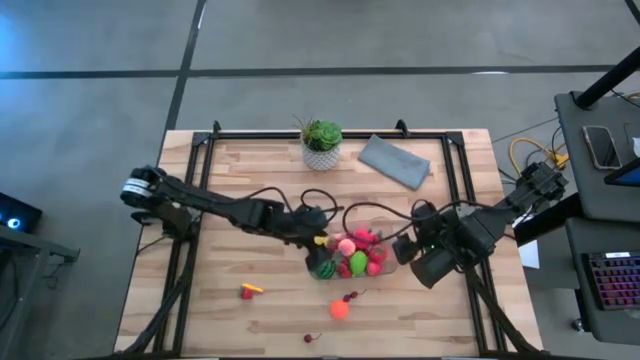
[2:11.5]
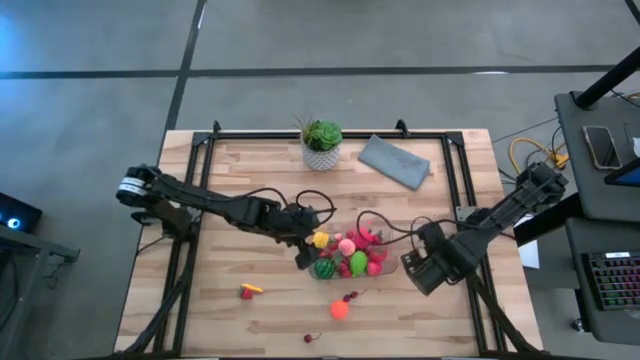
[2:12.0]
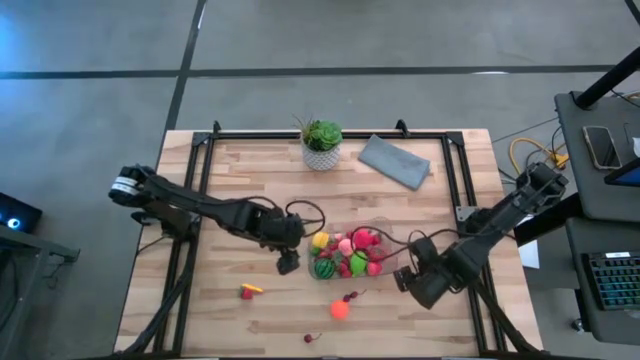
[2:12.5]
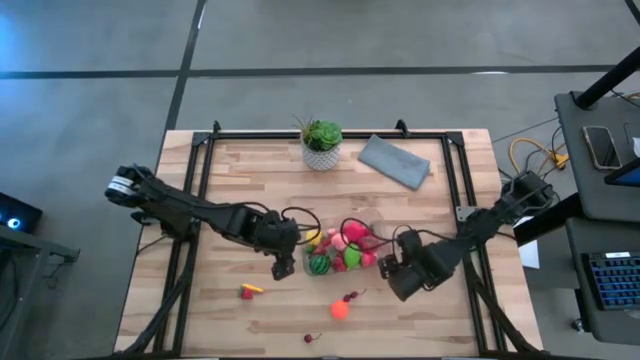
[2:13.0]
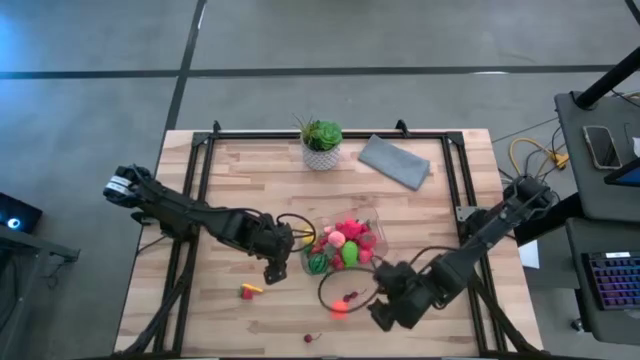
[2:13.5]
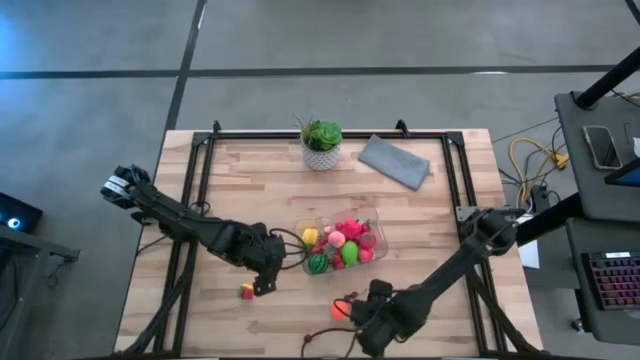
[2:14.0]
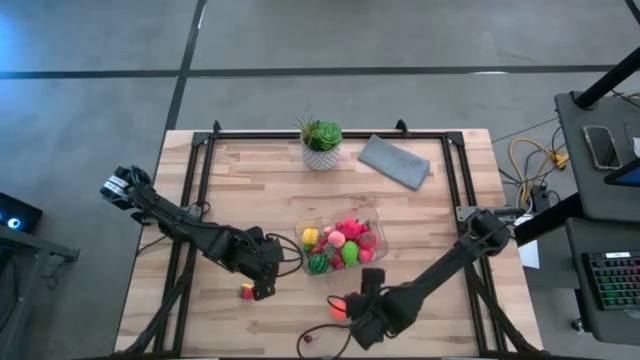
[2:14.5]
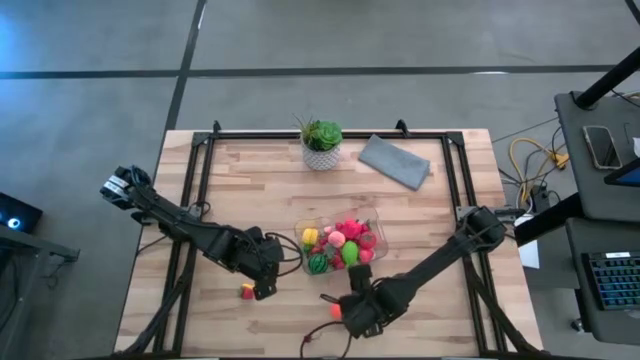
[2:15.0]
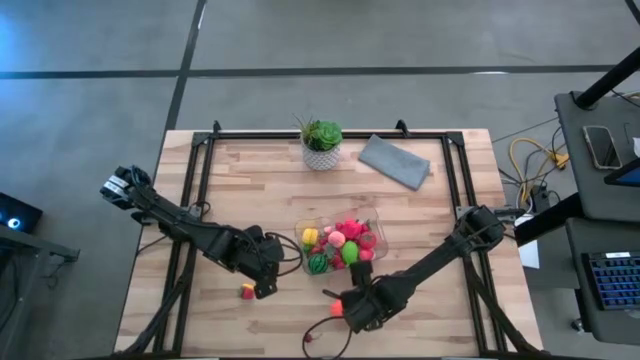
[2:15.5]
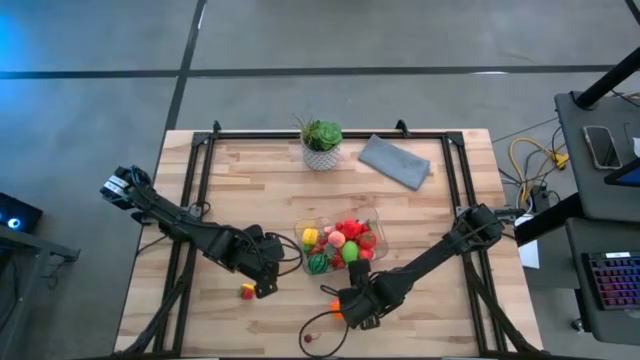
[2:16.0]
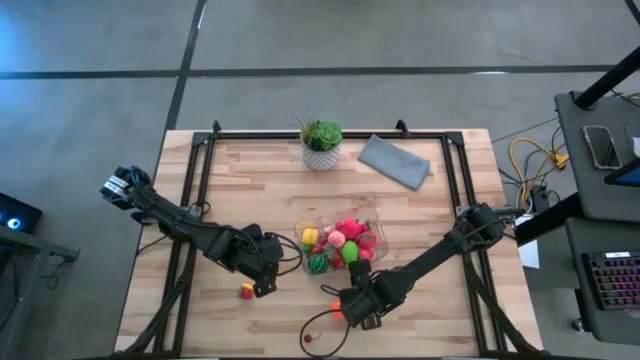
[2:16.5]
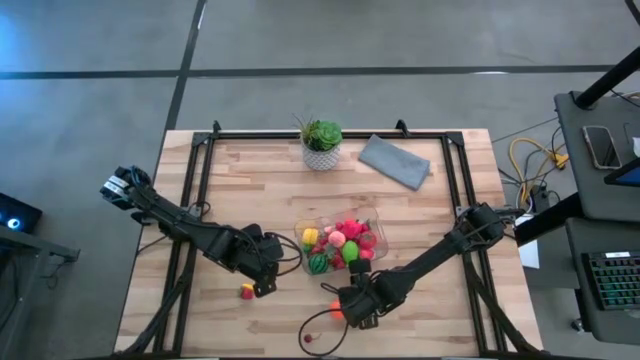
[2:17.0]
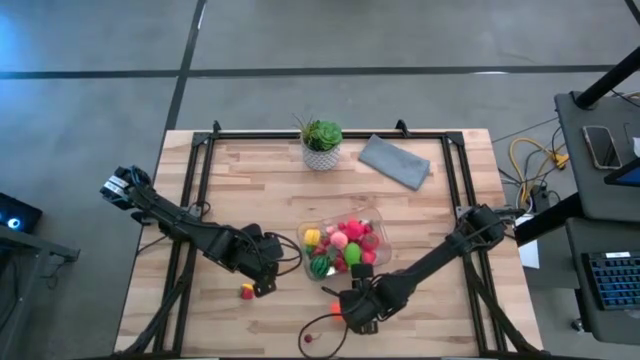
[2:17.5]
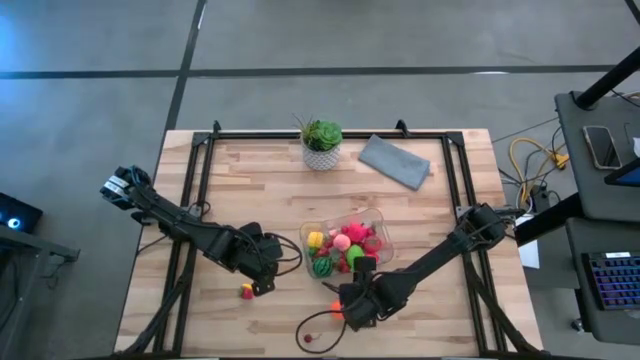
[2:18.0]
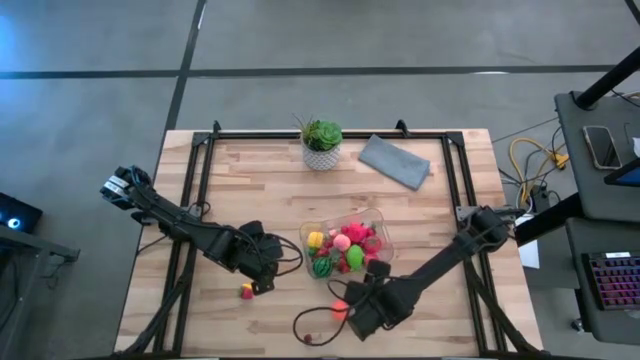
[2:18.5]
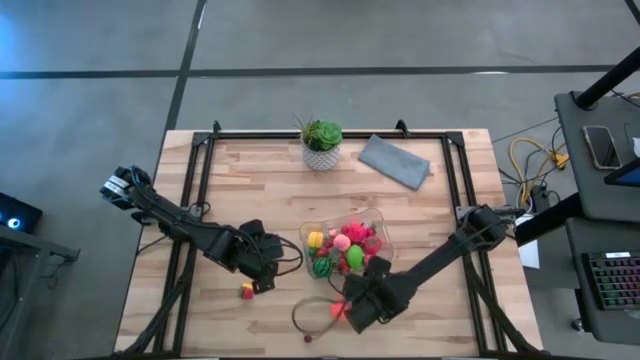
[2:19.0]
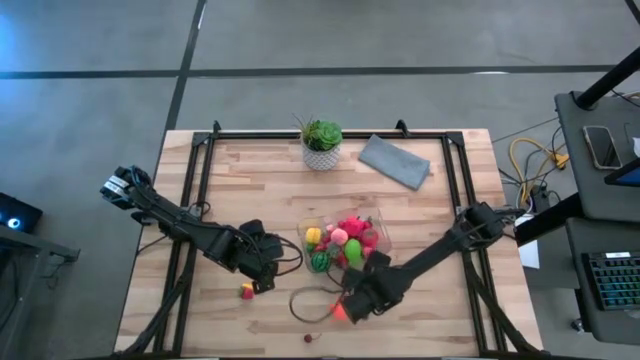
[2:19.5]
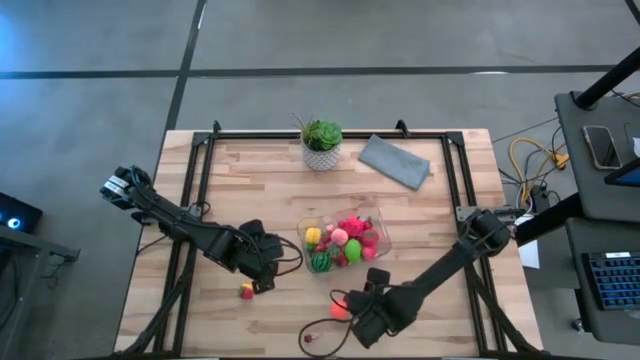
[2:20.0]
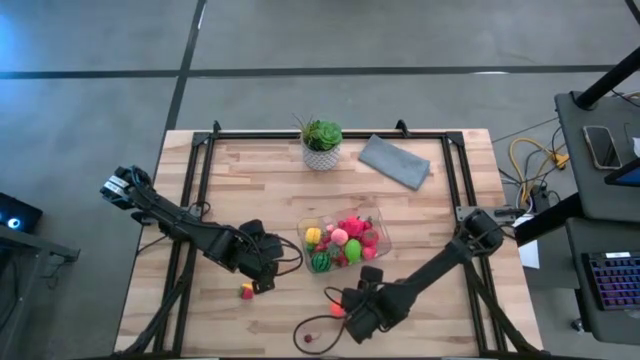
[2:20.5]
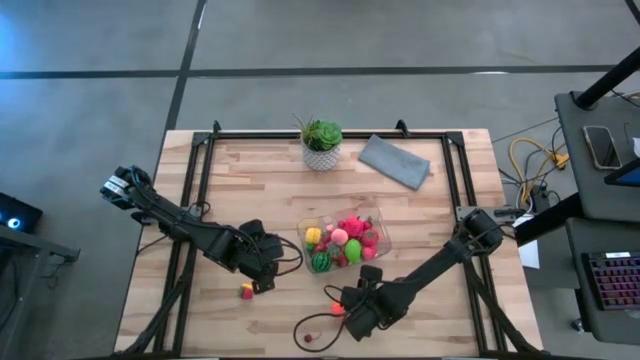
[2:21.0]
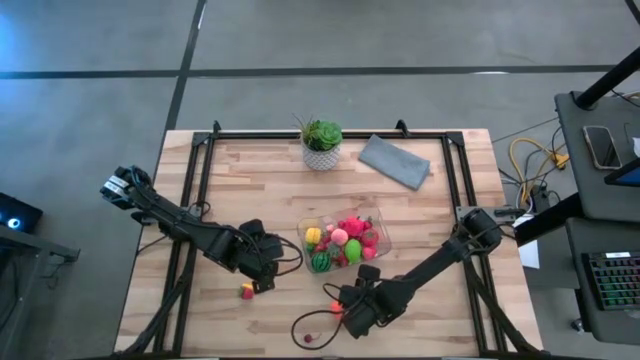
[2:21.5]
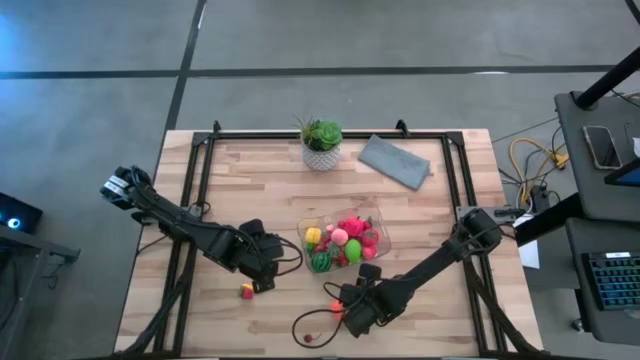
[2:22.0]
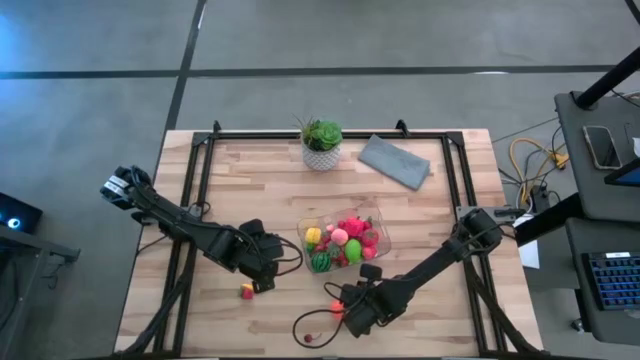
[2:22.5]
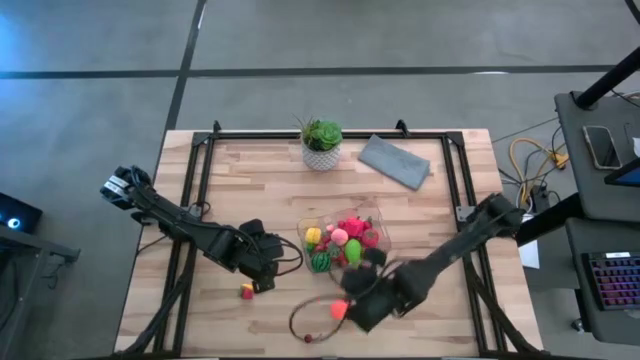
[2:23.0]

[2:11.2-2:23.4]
Task: Pick and placing Produce into tupperware
Put the cherry into the transparent bin

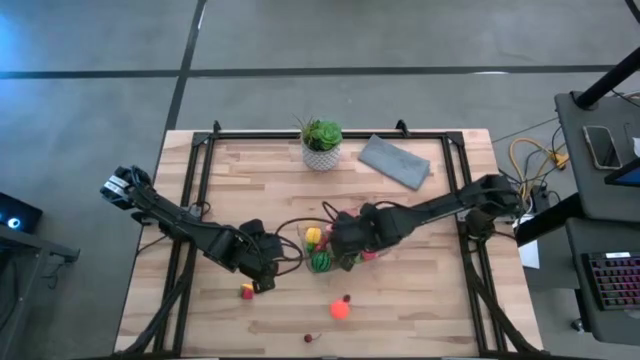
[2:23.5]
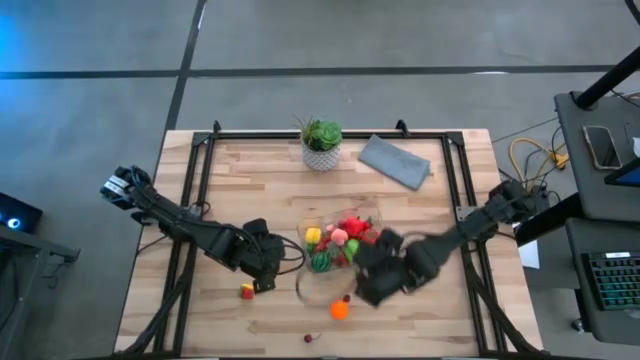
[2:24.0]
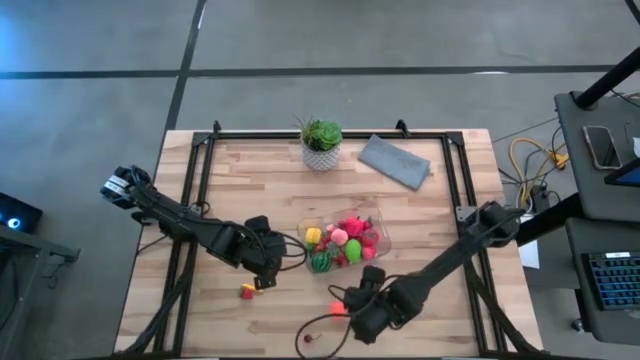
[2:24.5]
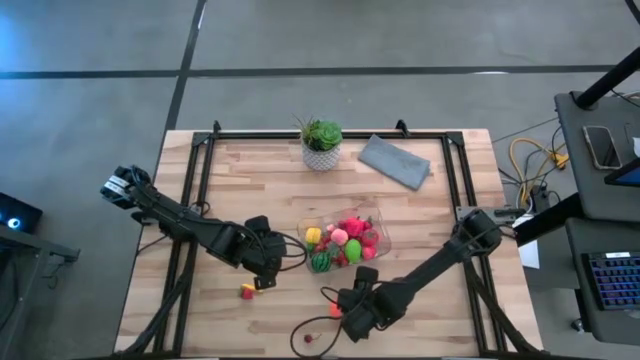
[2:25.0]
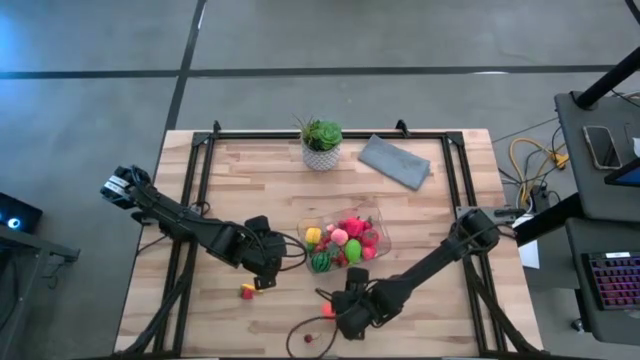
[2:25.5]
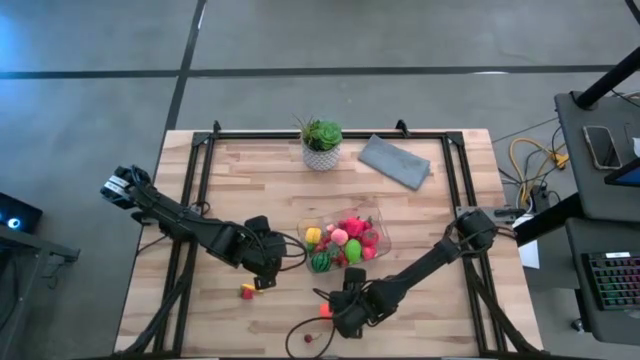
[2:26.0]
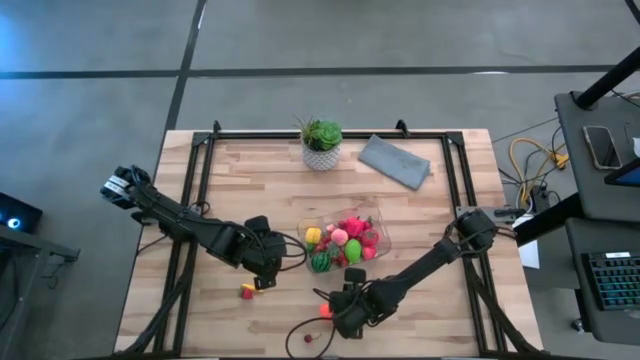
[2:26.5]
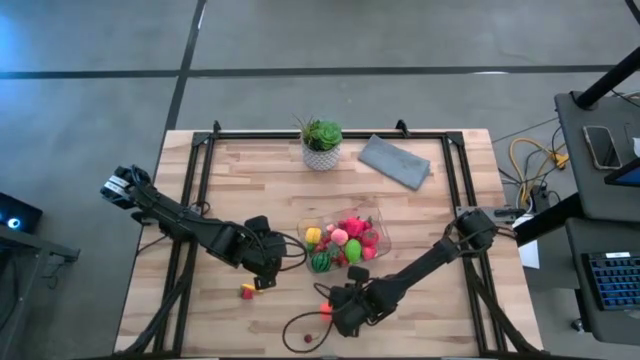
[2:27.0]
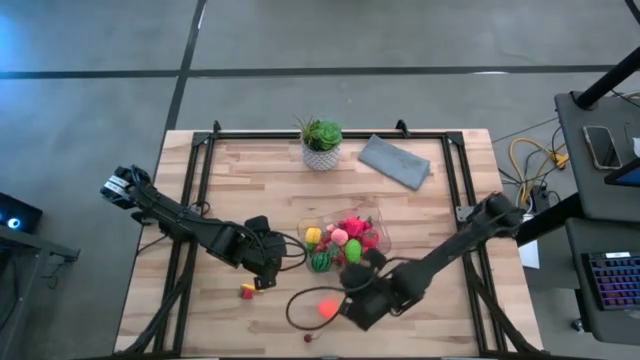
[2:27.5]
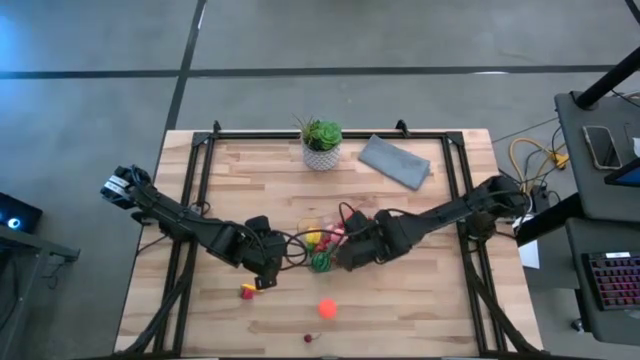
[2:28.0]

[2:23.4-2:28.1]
Put the cherry into the transparent bin

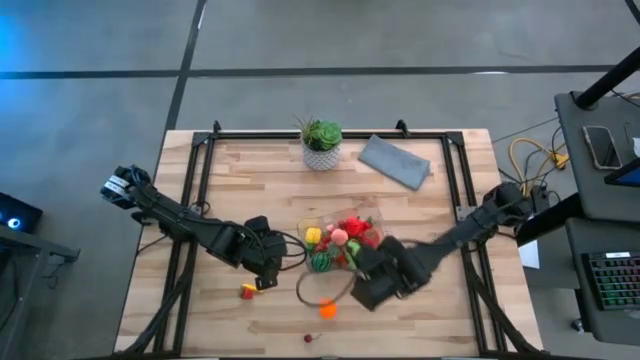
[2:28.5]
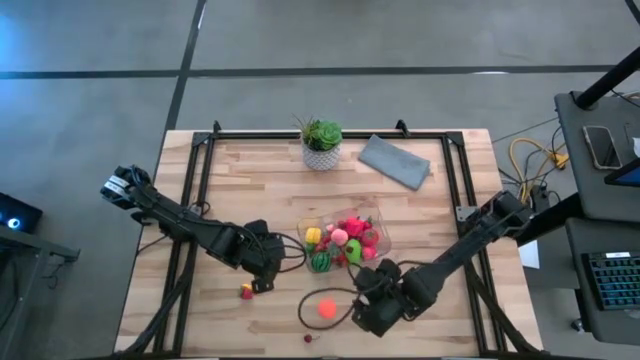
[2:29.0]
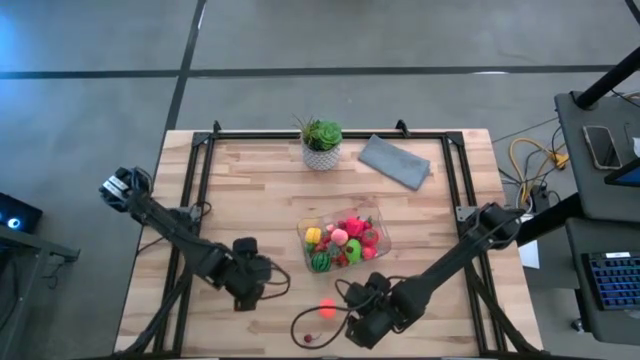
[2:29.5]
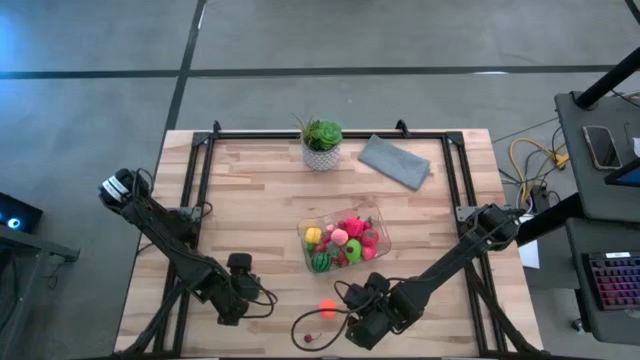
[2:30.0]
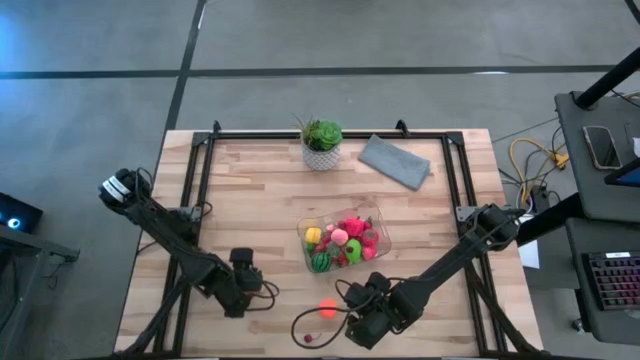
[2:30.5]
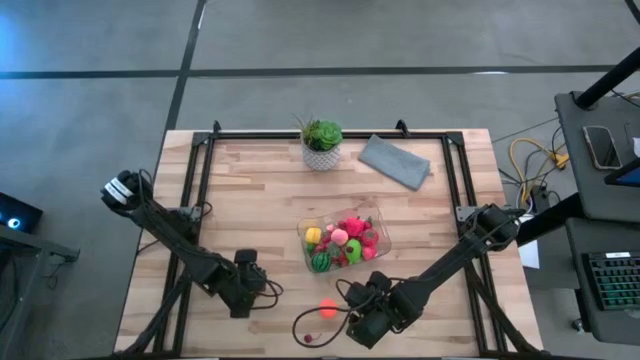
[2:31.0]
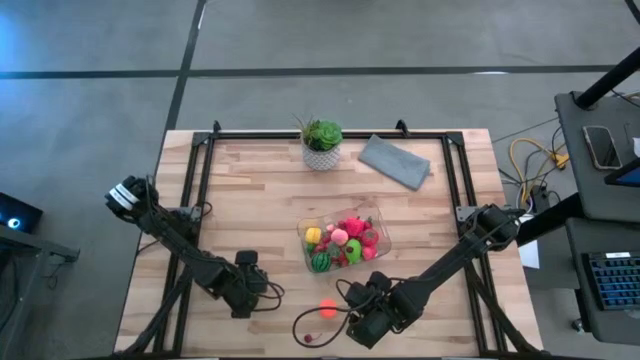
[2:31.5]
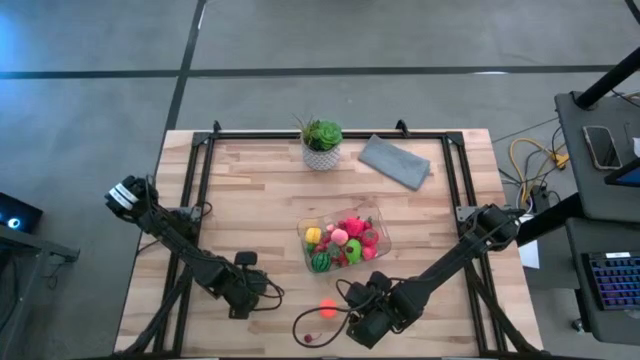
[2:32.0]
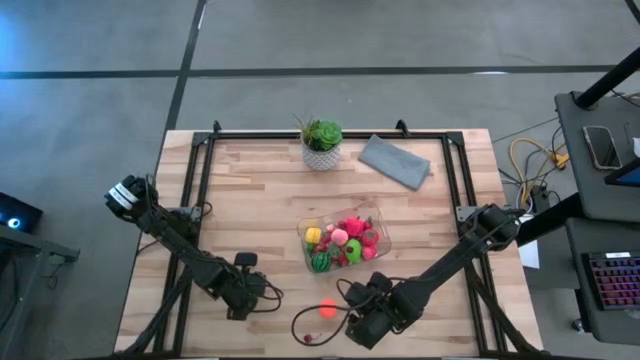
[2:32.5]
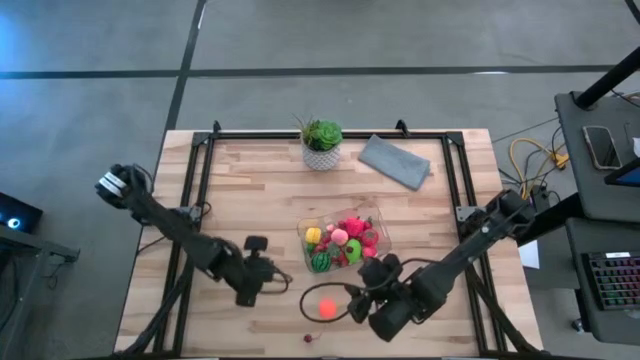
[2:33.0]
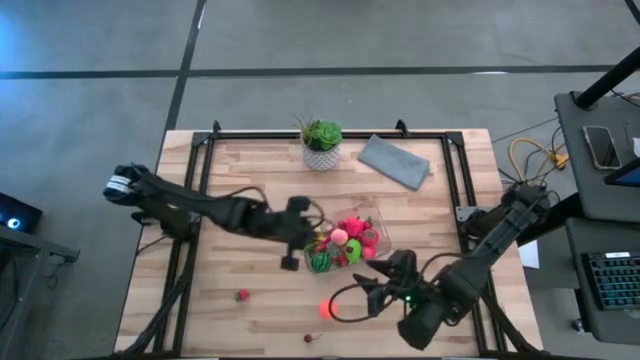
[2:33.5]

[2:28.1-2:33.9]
Put the corn into the transparent bin

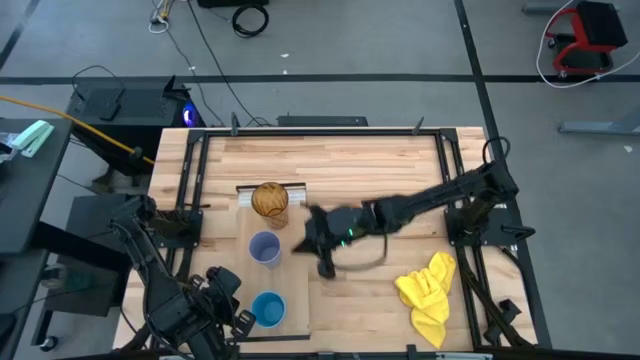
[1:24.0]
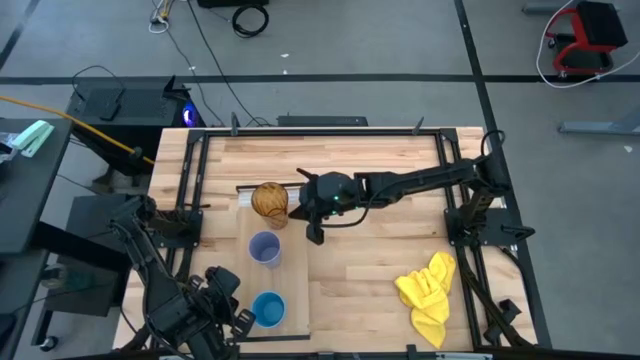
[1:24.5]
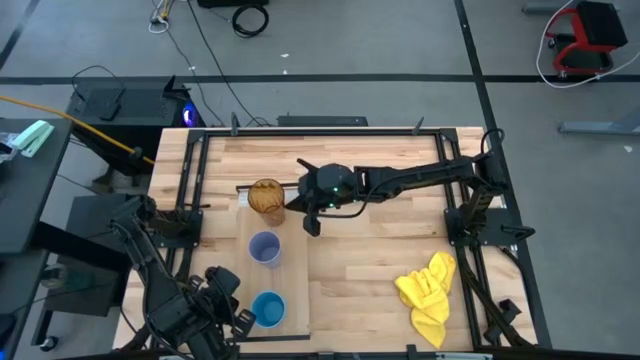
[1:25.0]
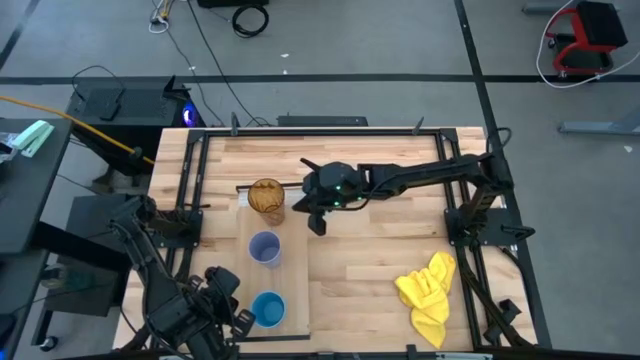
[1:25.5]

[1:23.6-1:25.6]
Task: Stack small to large cups/mugs on shelf
Adjust the brown cup
